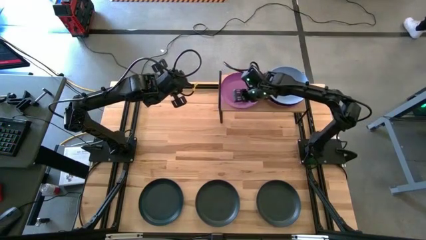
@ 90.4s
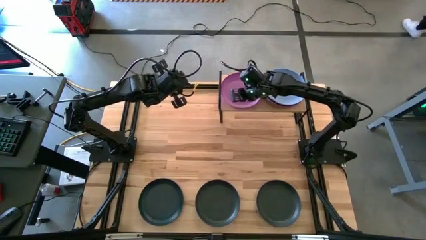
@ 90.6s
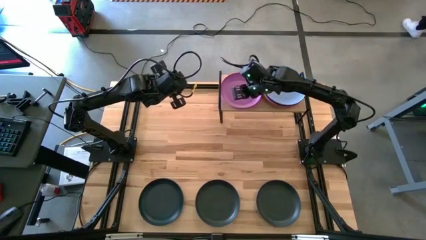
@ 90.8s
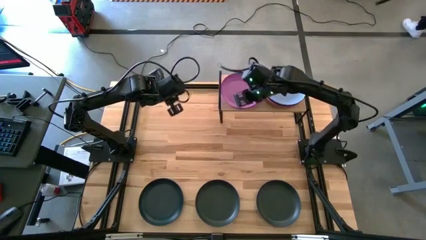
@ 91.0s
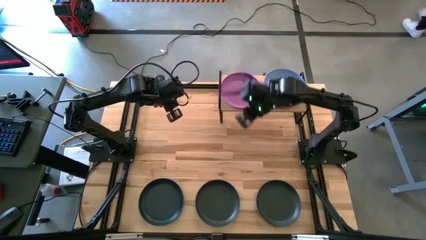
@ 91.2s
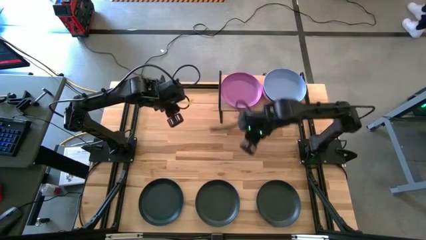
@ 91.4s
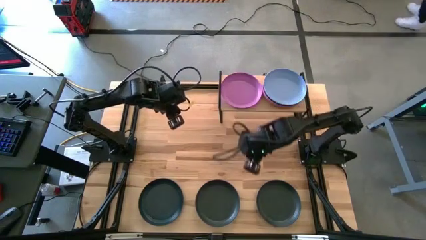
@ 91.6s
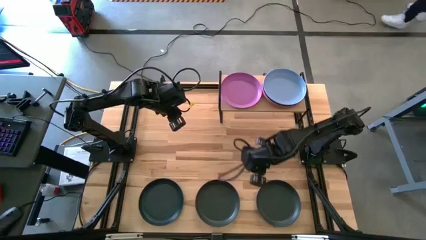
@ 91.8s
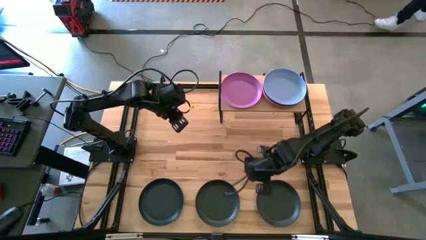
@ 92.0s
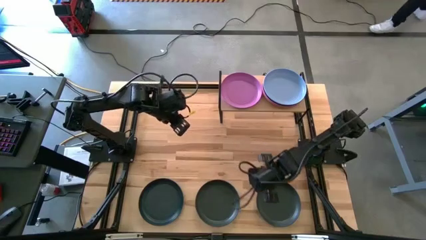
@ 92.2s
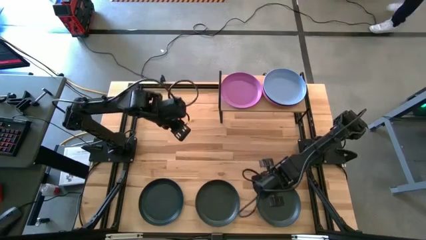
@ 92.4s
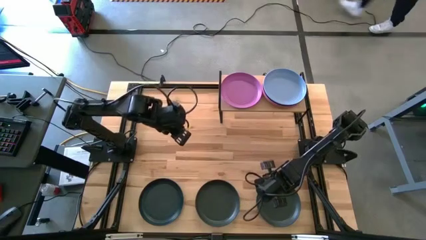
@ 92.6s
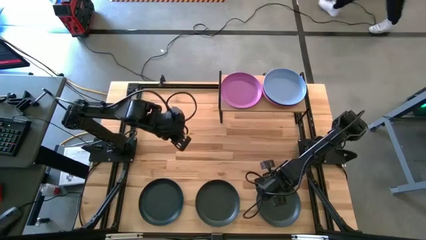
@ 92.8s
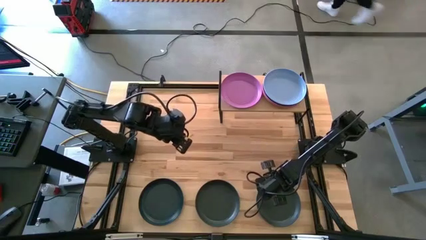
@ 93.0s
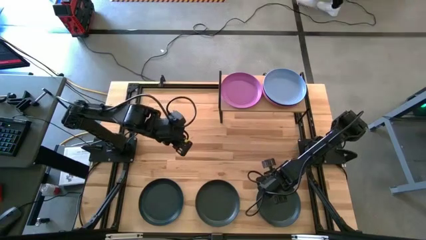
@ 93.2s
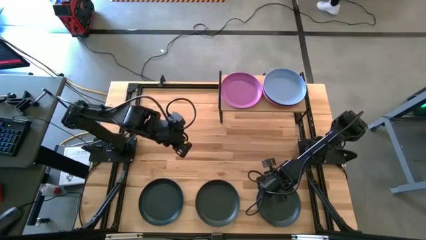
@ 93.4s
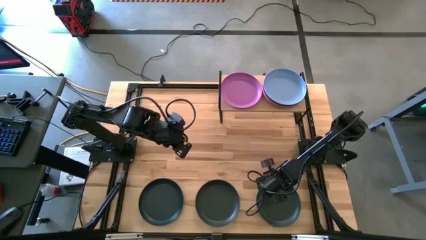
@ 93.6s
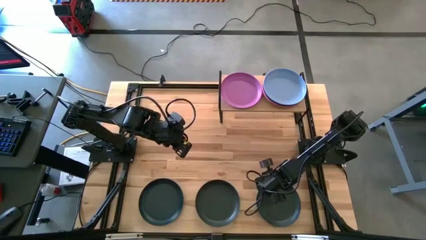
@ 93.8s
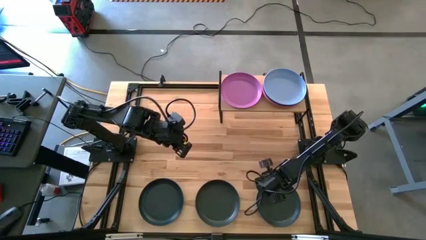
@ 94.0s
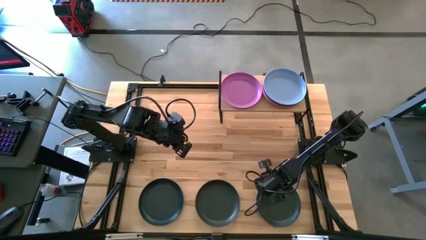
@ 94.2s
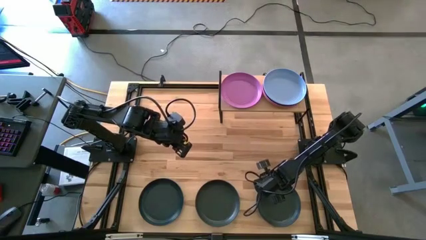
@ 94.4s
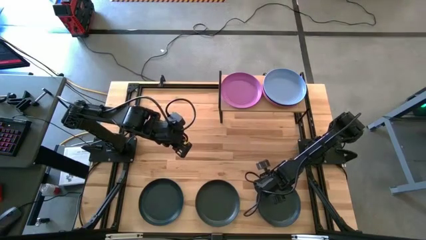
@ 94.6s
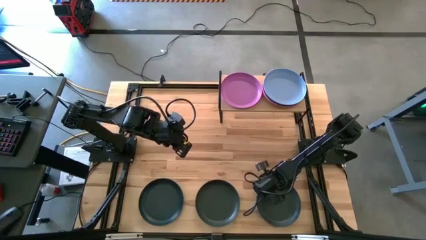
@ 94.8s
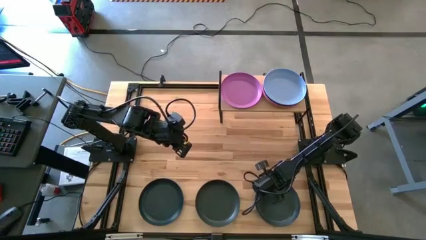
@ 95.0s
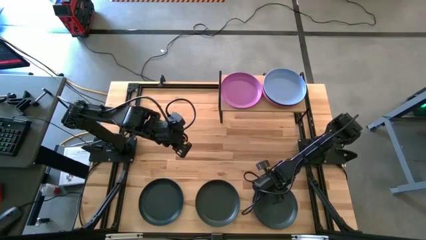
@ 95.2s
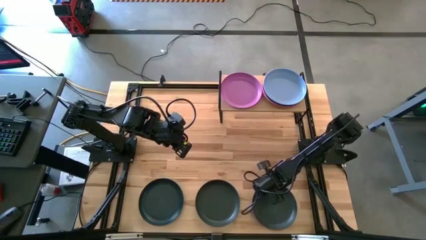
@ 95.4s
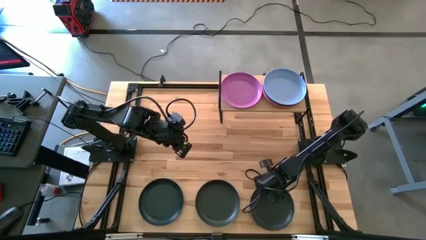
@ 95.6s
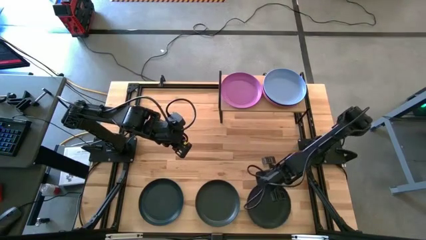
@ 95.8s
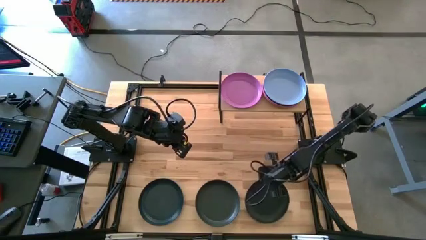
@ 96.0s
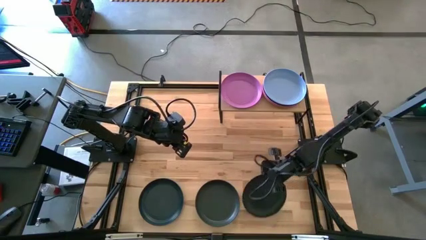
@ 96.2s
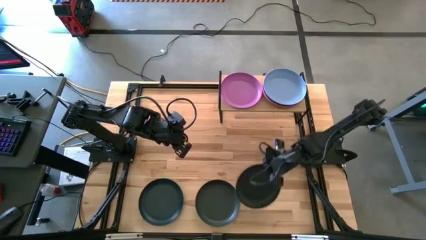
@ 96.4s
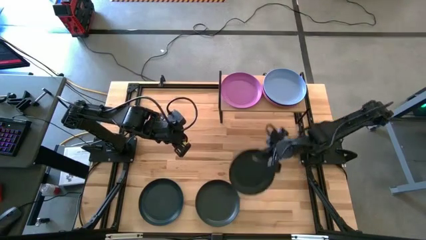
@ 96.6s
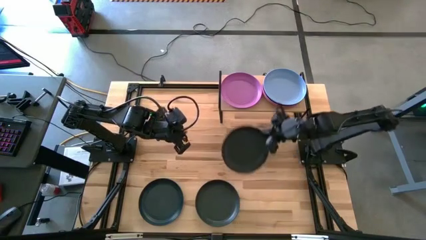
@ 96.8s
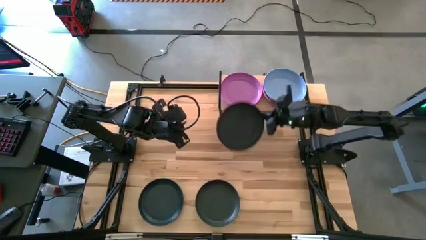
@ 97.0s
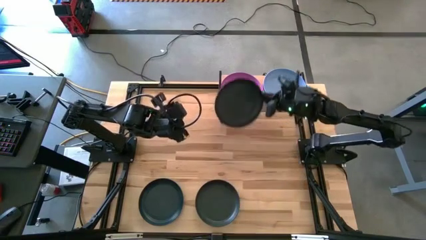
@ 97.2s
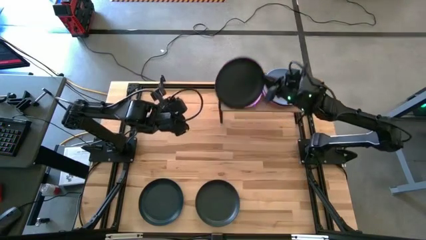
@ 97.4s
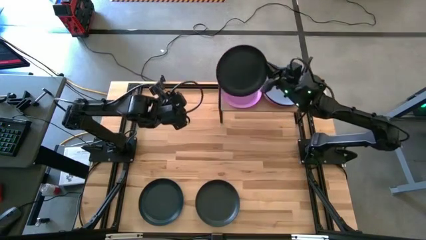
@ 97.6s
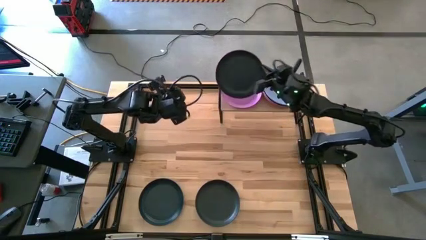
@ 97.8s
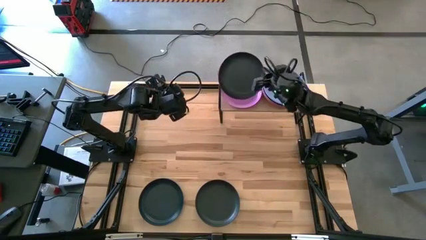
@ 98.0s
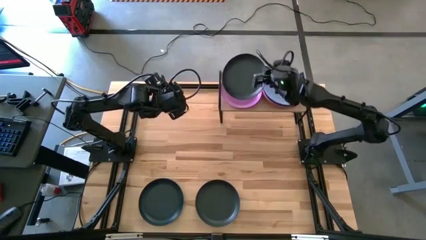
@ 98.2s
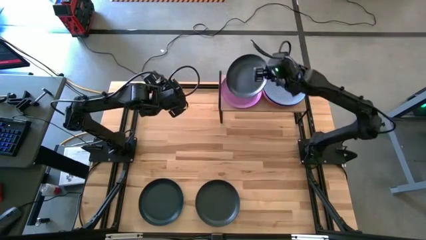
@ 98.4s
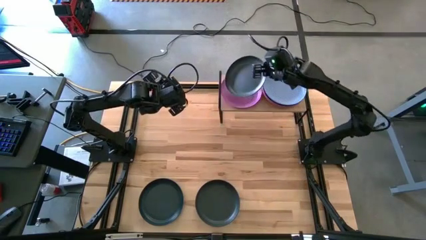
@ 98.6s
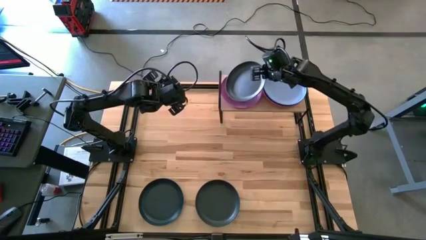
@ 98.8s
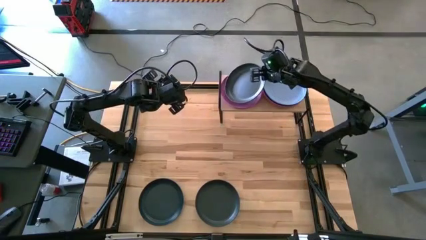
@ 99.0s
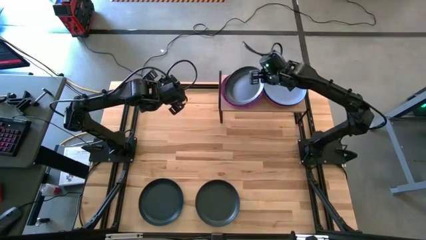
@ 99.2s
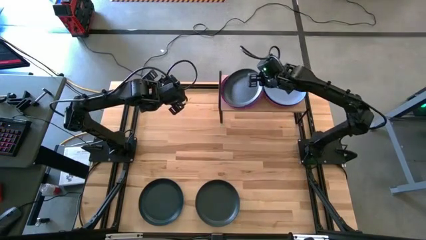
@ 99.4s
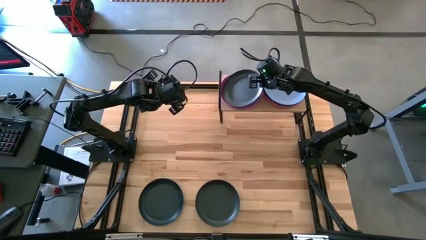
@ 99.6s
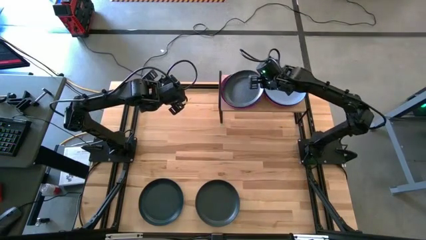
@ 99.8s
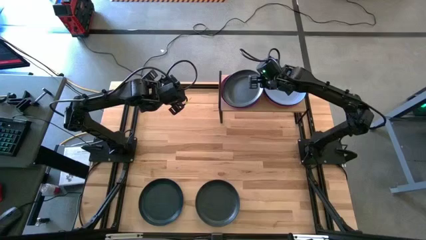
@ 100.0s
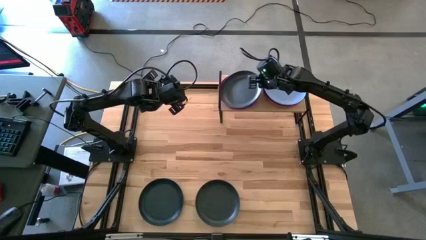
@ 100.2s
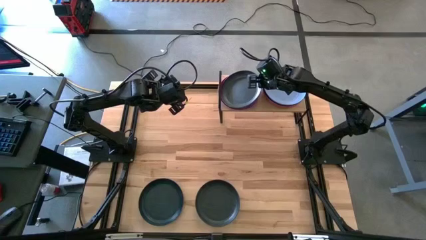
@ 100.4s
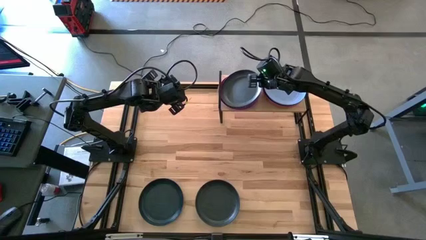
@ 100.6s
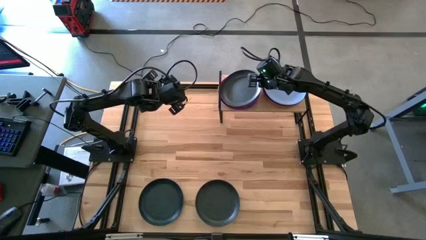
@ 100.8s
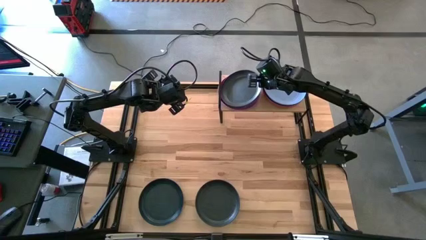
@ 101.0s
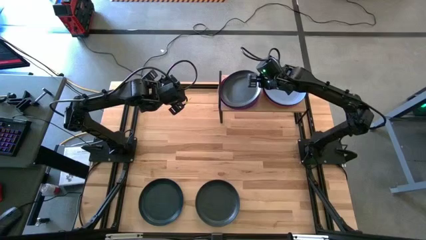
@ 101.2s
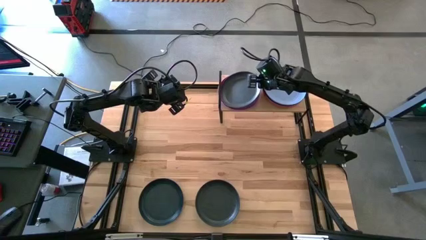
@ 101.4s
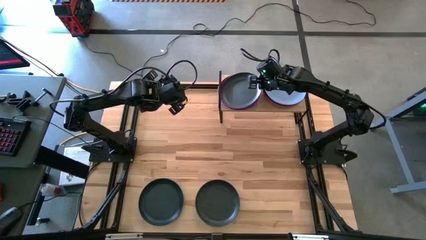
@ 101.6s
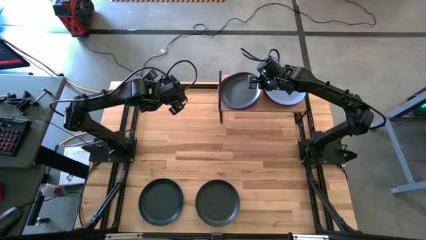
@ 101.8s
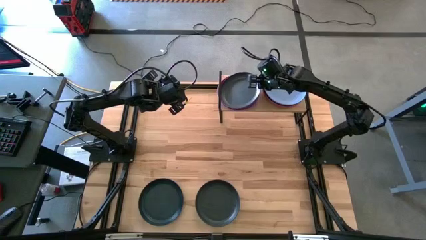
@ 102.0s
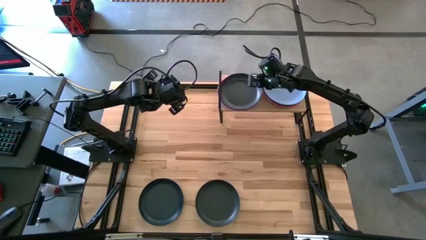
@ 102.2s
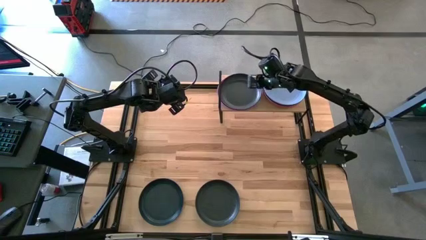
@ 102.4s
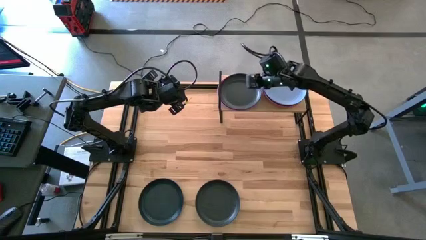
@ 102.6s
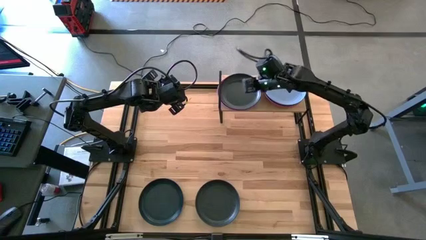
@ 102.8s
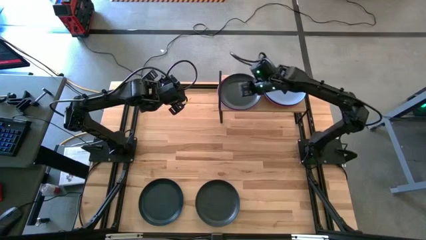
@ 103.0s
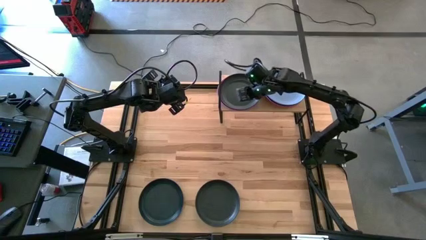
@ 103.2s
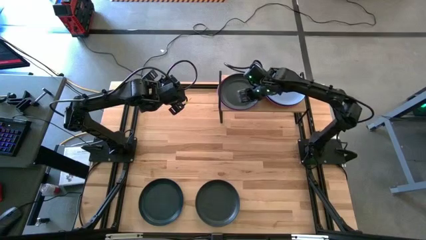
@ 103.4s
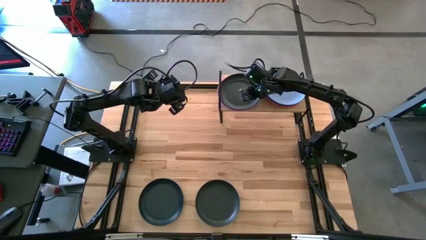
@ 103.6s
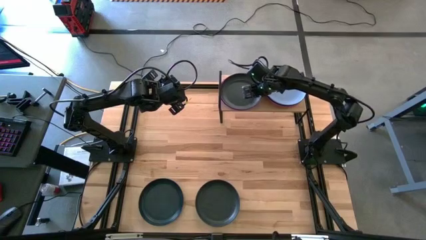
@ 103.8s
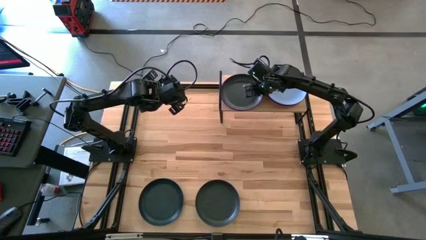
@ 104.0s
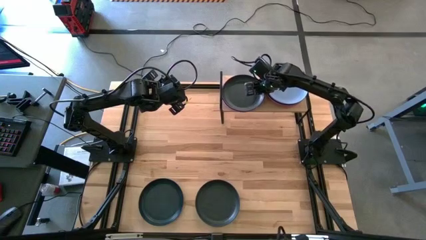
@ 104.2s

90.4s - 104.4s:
Task: Place and stack plates onto a shelf
Stack the right black plate on top of the violet plate on the shelf
